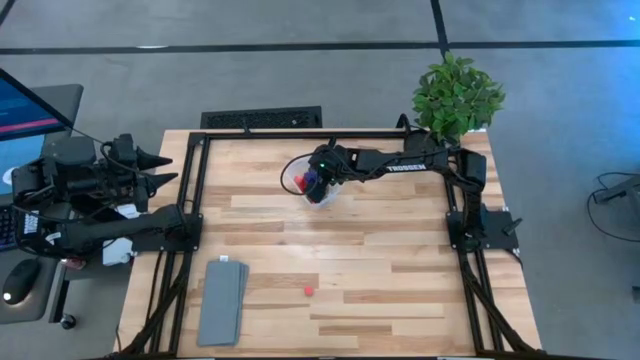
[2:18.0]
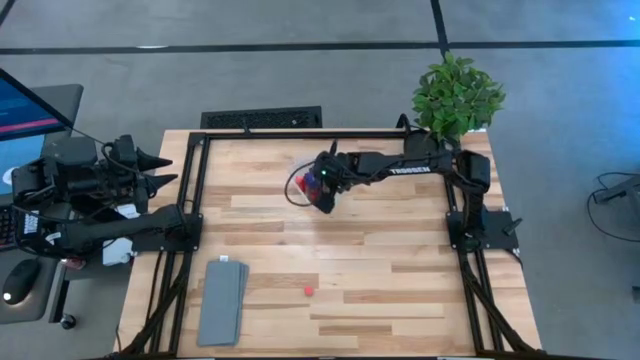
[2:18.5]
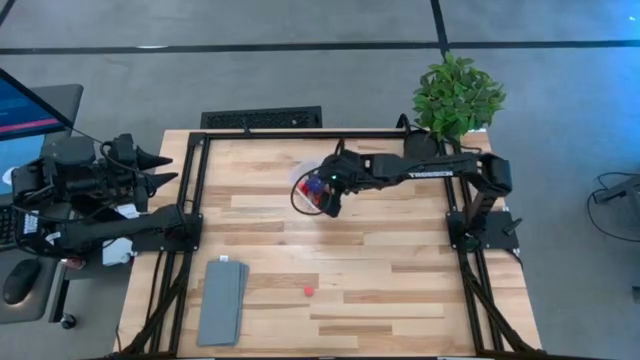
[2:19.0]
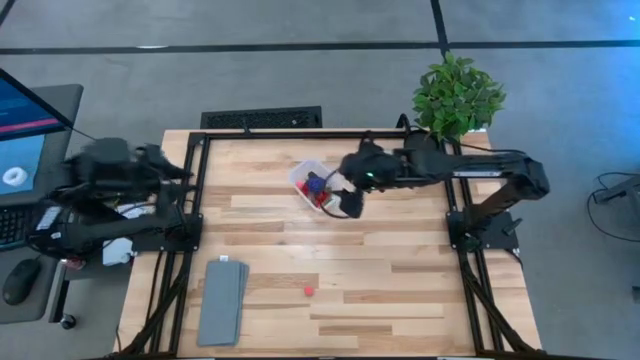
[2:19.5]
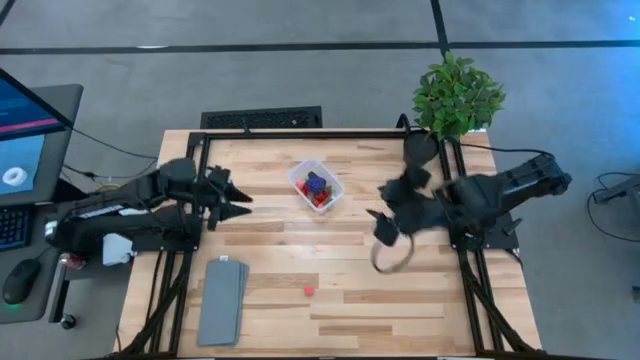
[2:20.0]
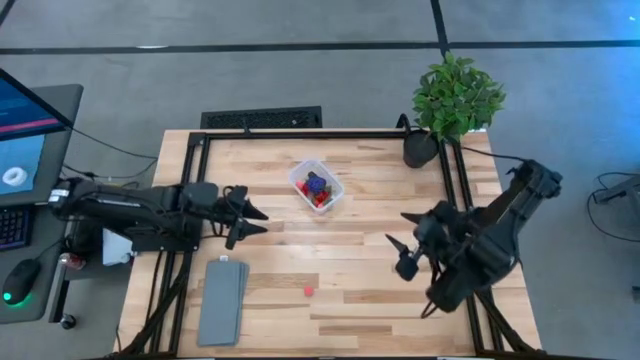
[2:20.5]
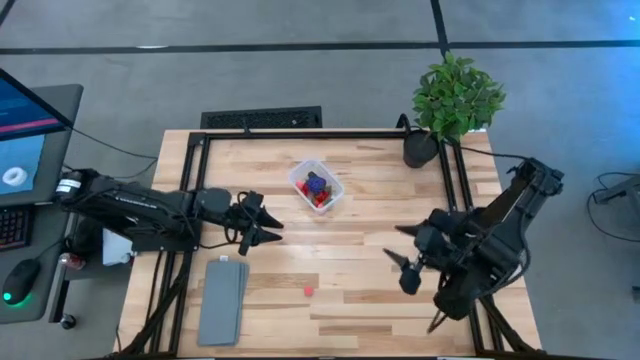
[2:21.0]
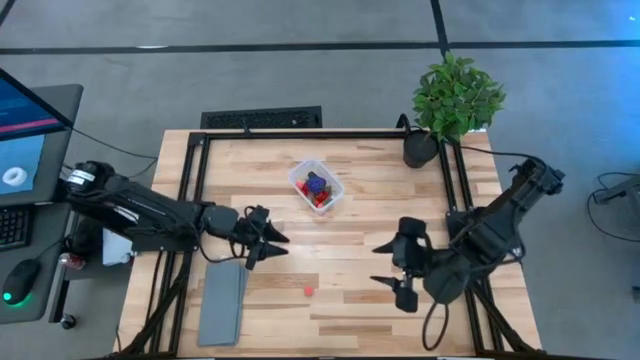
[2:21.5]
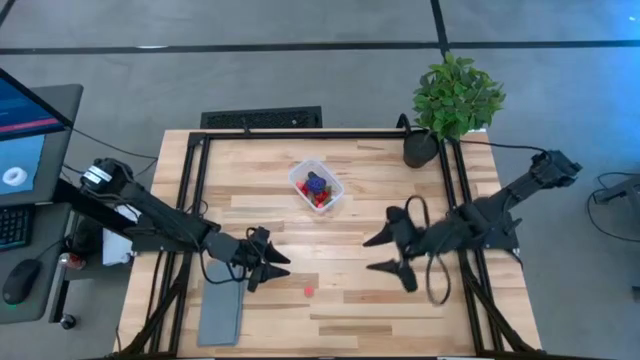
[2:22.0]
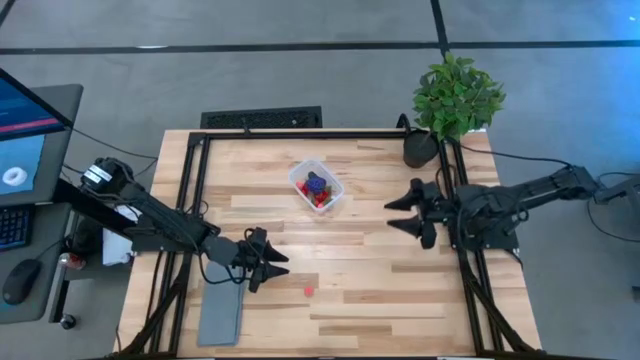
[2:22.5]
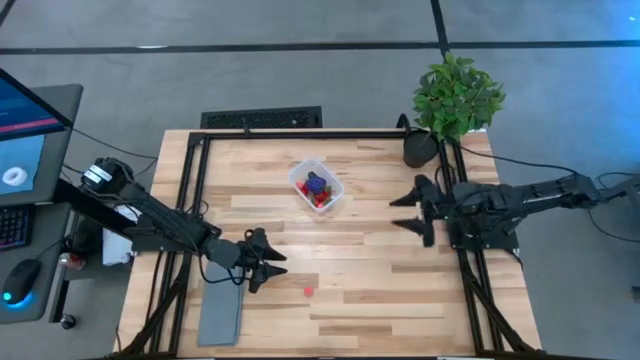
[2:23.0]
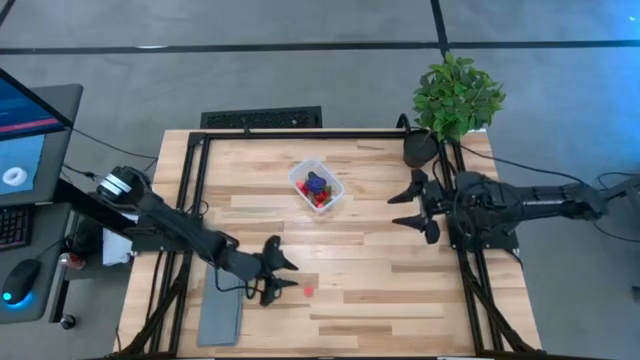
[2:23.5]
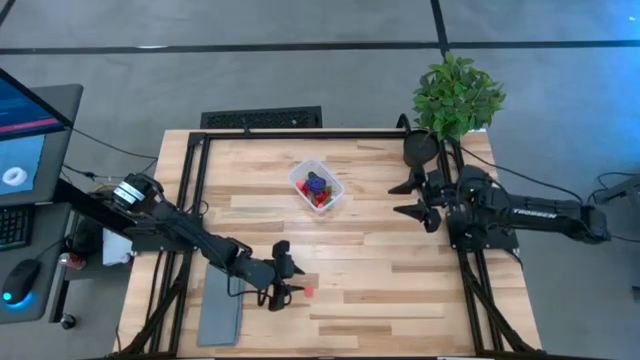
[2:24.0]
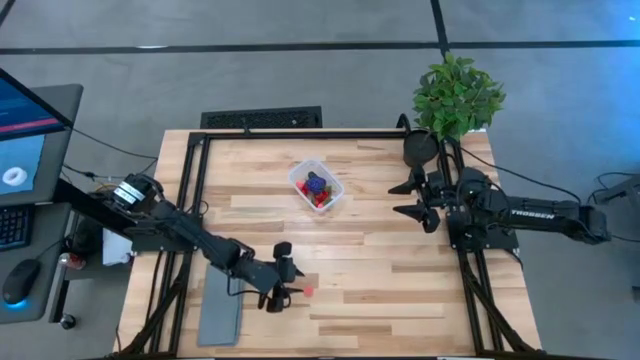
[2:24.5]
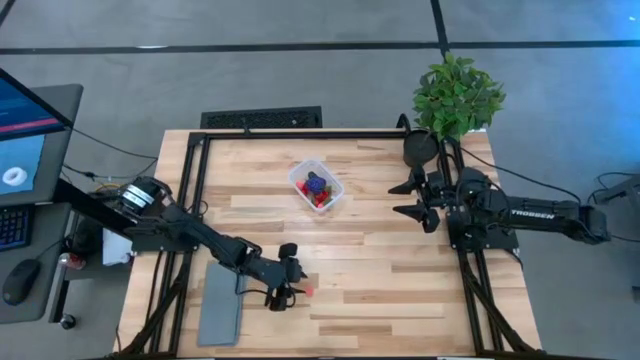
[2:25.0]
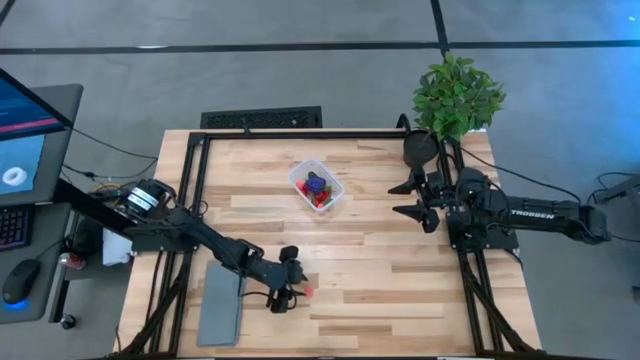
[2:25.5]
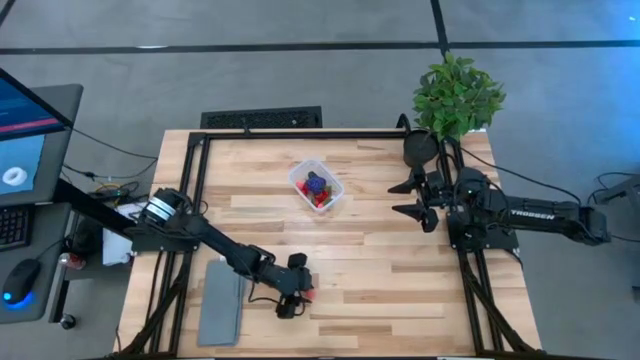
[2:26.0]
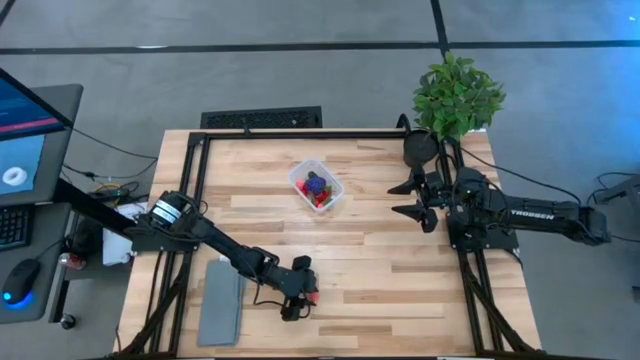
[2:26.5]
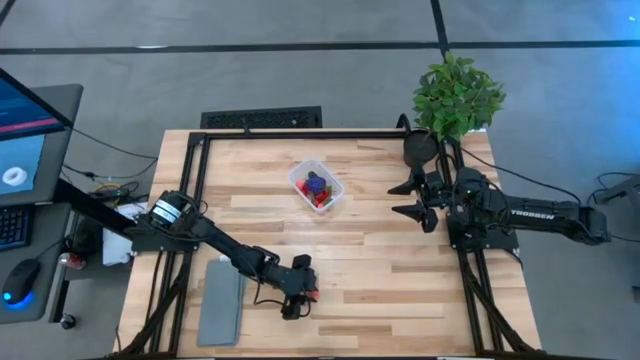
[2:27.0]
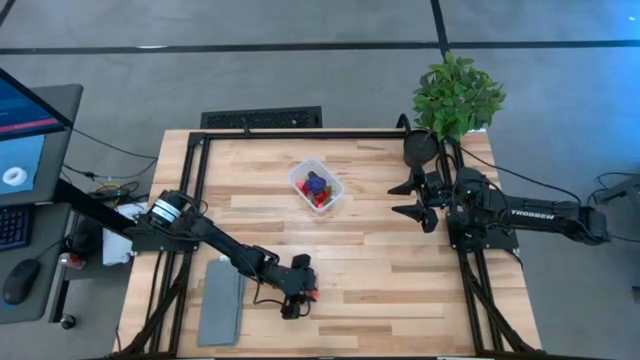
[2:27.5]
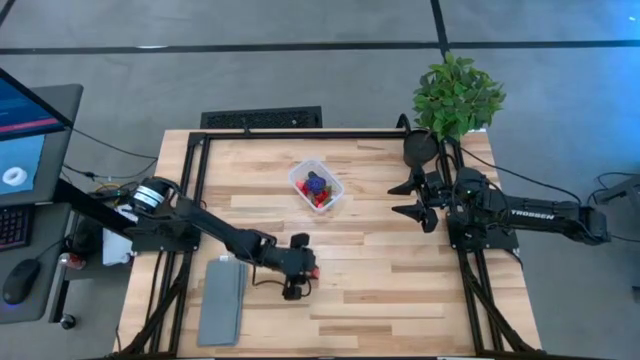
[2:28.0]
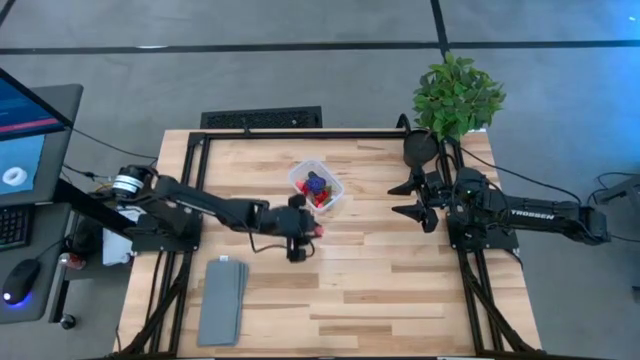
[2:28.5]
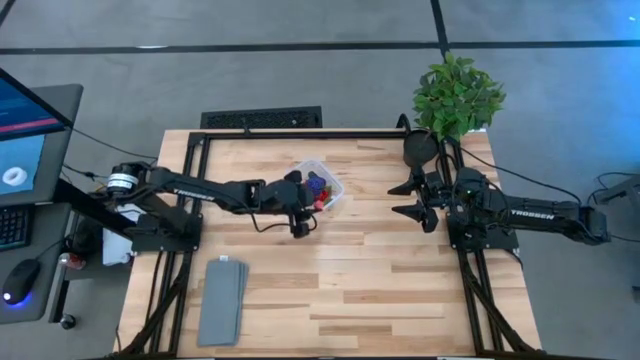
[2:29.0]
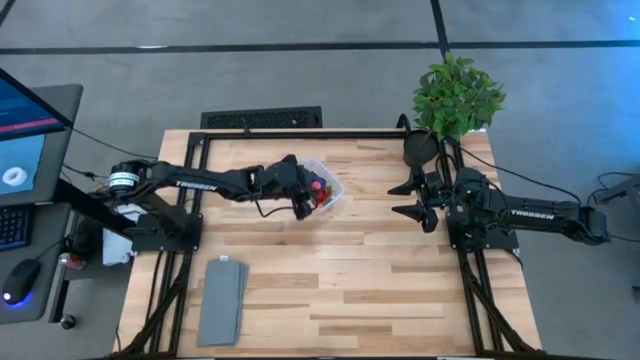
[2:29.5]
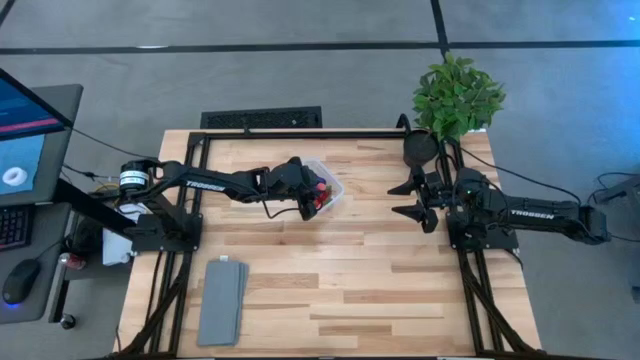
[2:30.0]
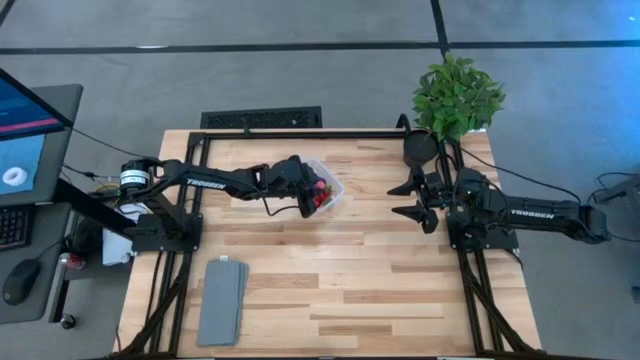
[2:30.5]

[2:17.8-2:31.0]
Task: Pick and placing Produce into tupperware
Put the peach into the transparent container

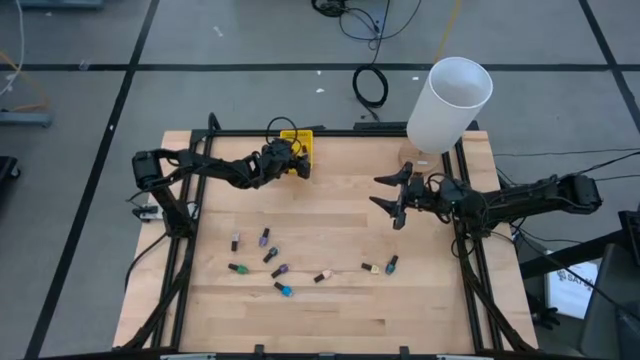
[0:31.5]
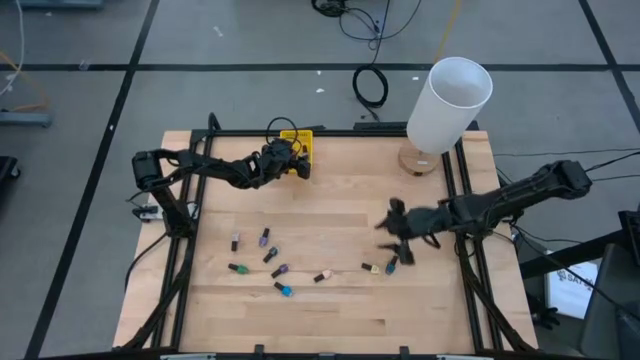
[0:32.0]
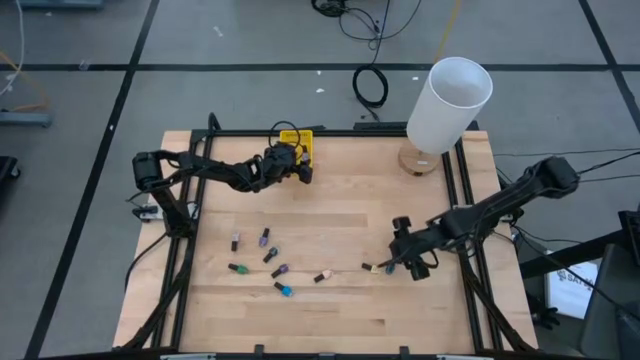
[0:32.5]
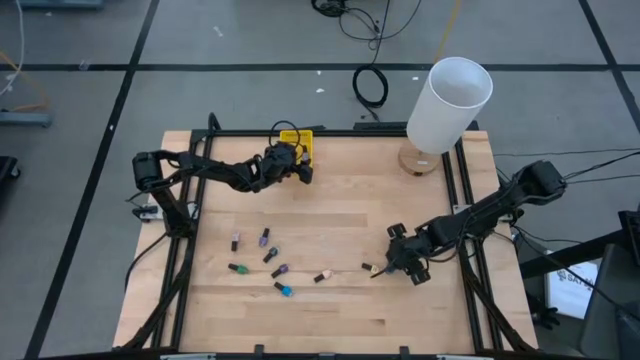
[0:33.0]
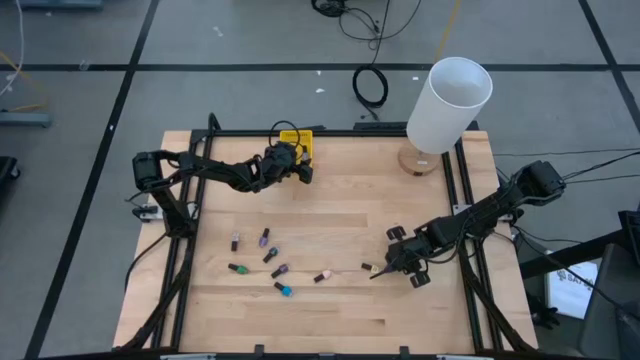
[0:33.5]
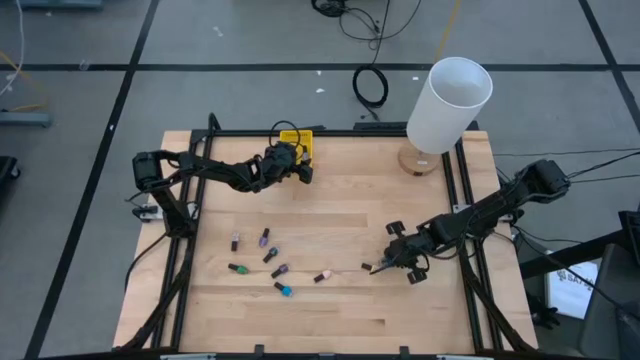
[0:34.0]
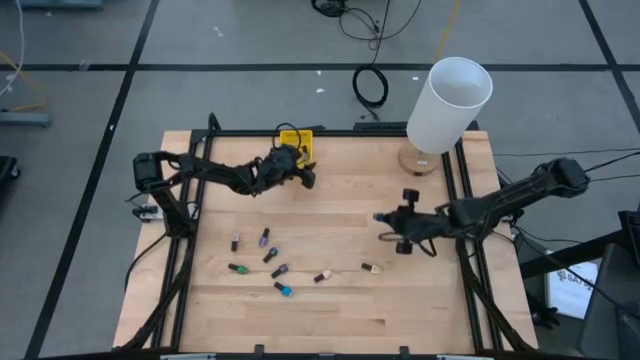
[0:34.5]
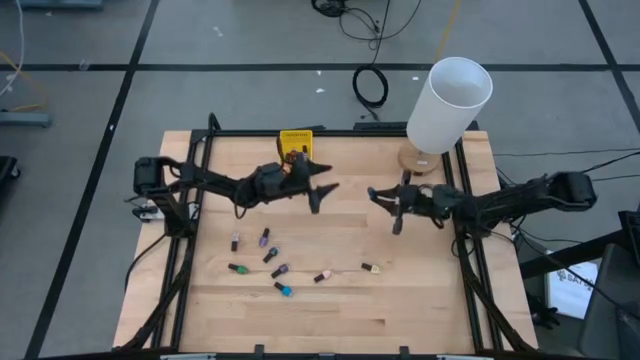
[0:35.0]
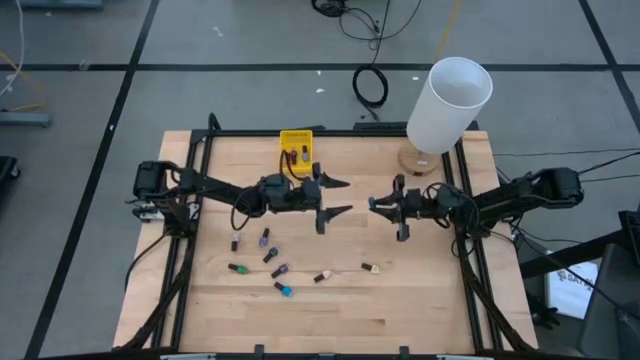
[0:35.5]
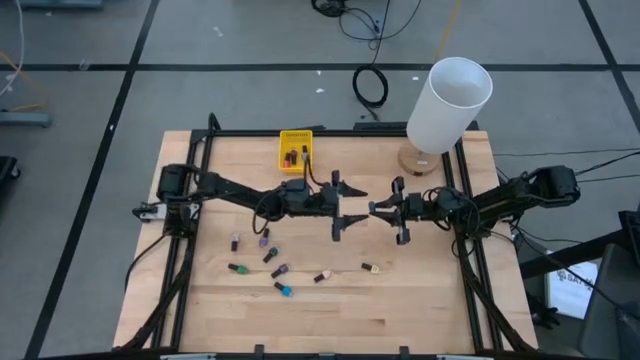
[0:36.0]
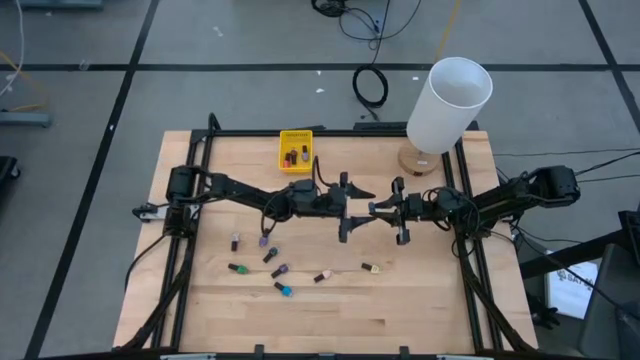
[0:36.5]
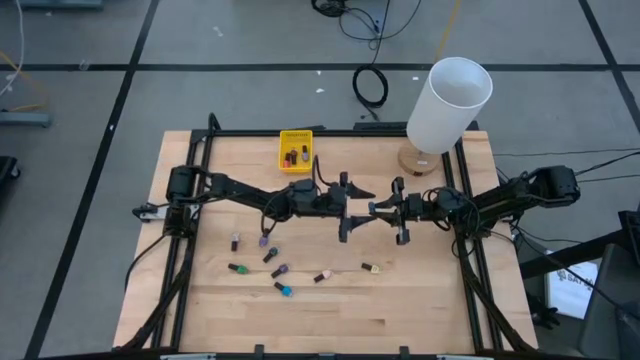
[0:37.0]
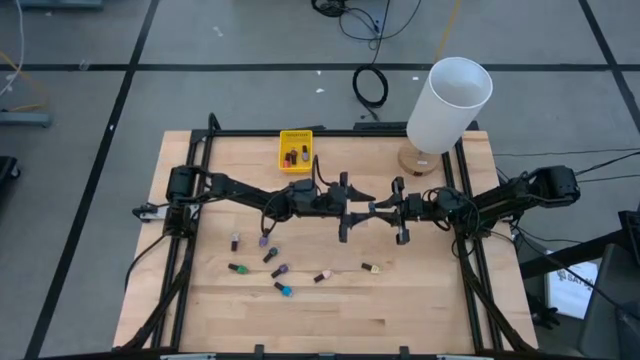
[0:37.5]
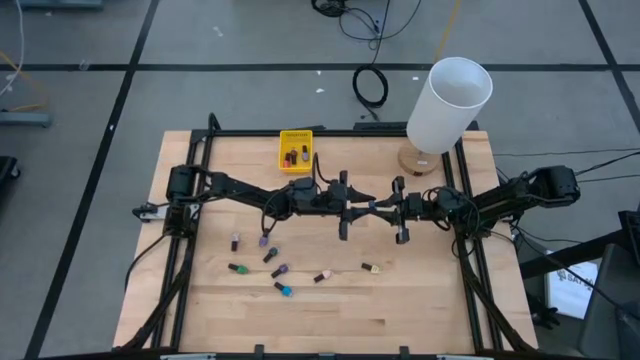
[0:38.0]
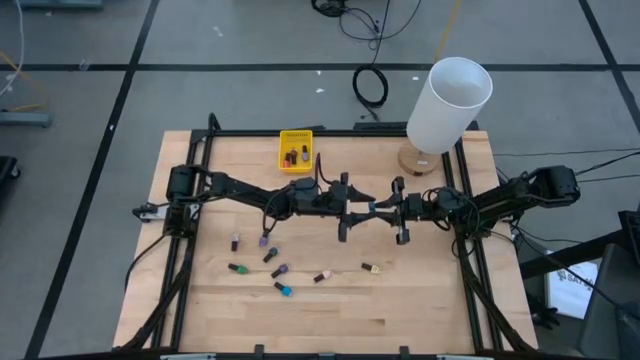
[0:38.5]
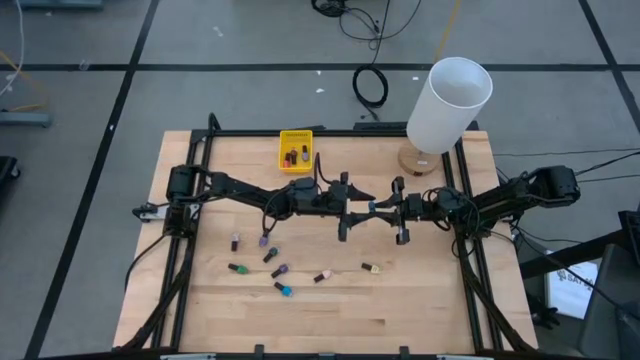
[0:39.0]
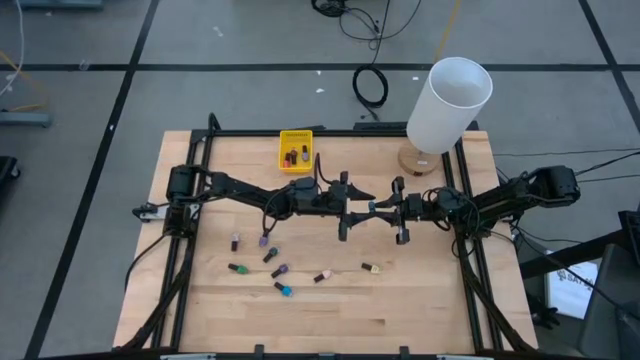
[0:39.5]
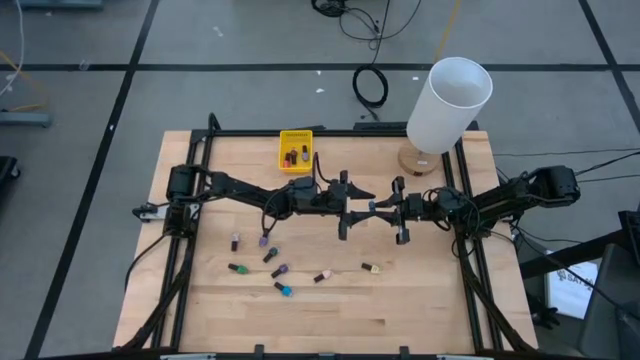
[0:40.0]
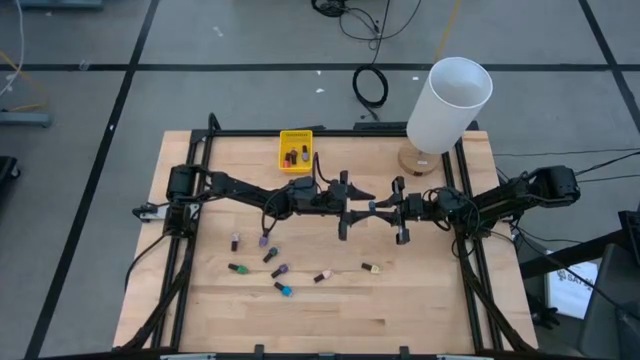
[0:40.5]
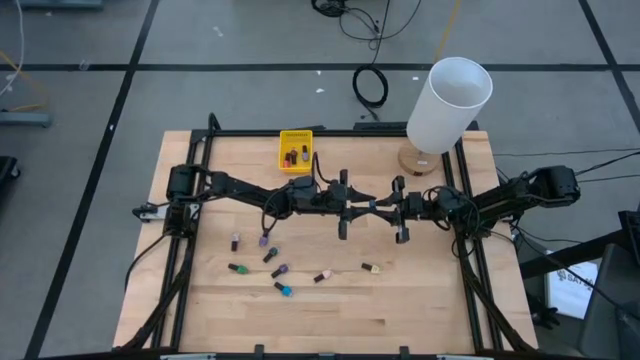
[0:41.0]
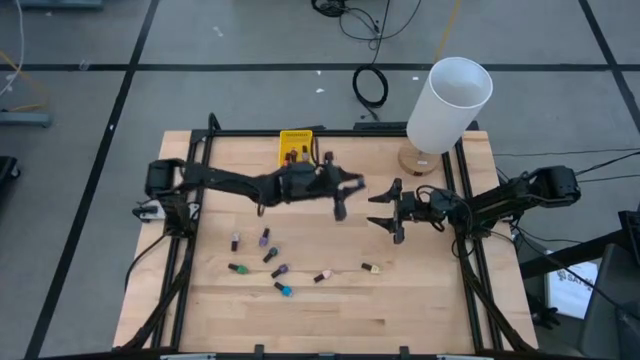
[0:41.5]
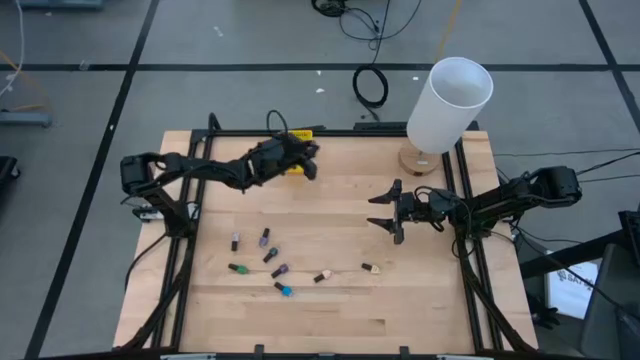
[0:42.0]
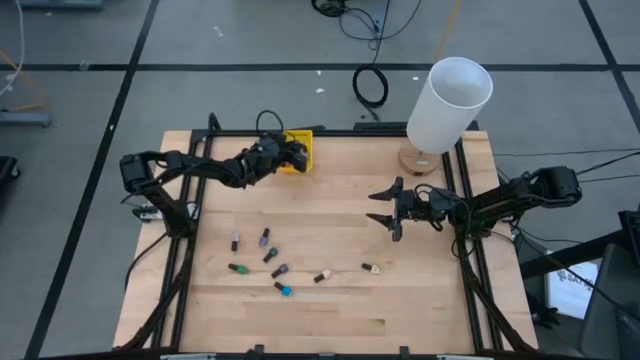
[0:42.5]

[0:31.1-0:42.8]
Task: Pick & Place Nail Polish
Put the dark blue nail polish bottle into the yellow bin
